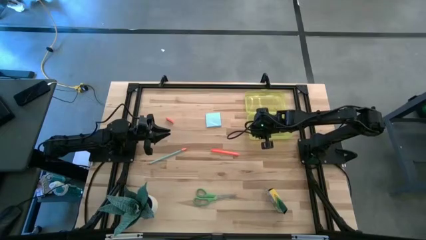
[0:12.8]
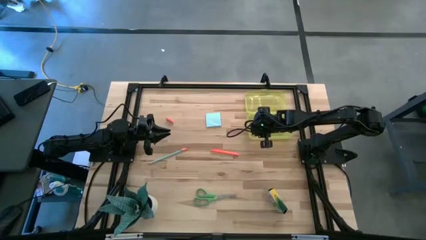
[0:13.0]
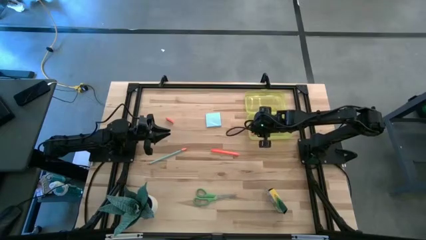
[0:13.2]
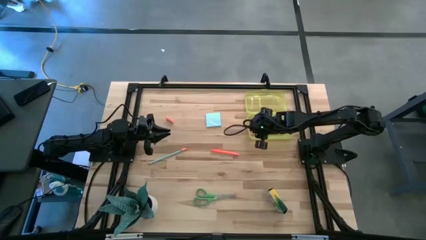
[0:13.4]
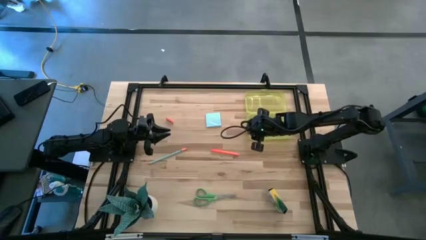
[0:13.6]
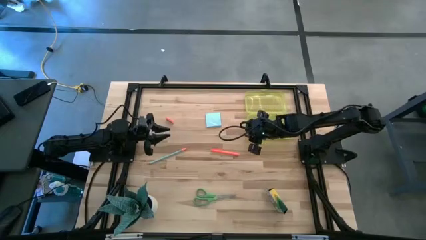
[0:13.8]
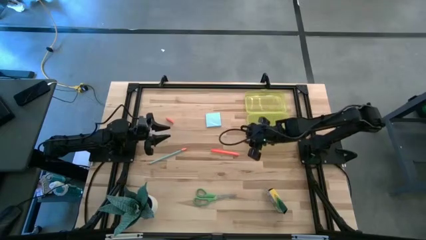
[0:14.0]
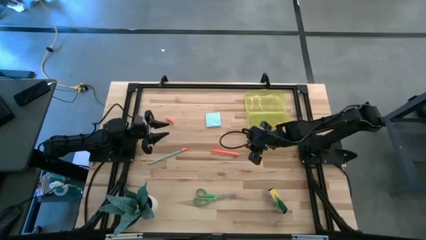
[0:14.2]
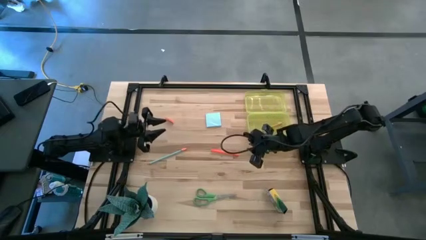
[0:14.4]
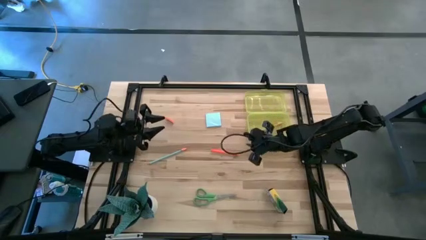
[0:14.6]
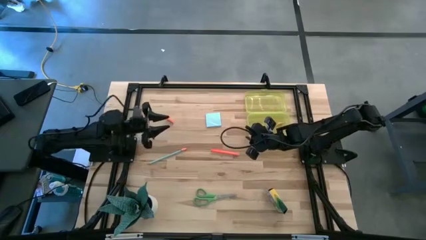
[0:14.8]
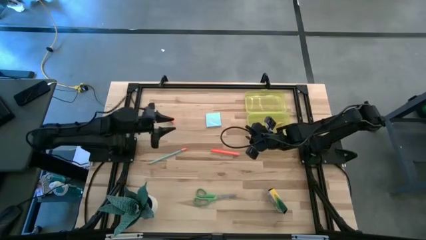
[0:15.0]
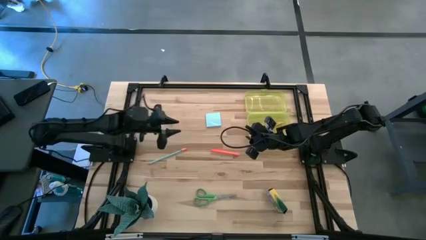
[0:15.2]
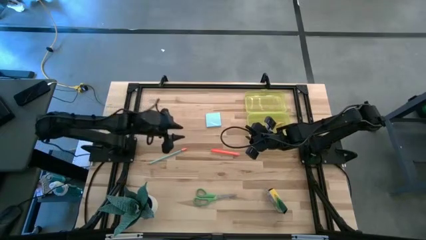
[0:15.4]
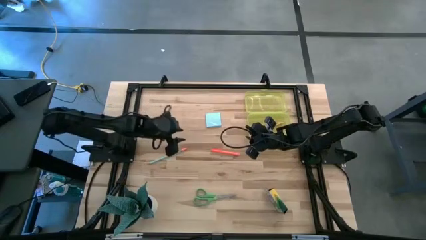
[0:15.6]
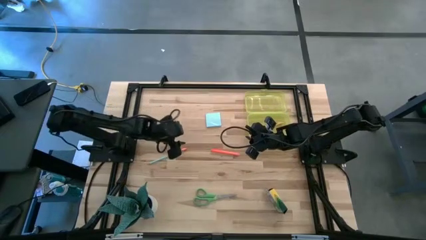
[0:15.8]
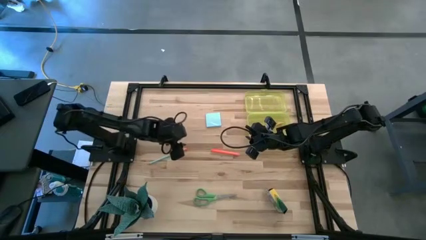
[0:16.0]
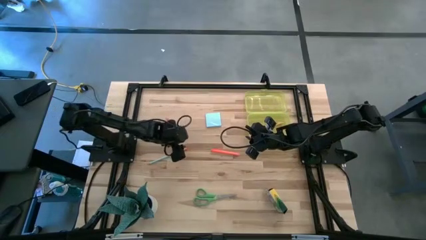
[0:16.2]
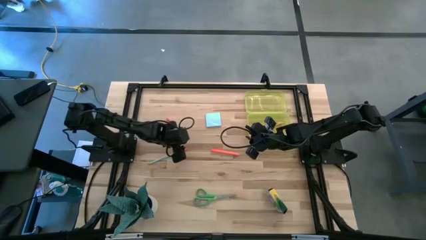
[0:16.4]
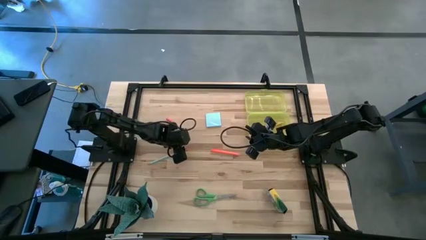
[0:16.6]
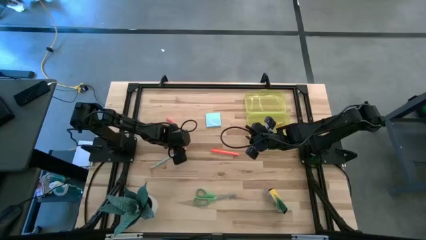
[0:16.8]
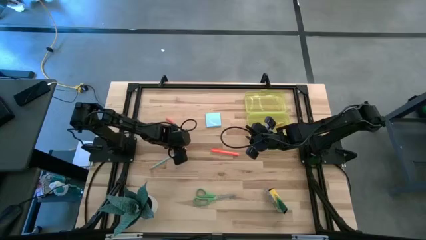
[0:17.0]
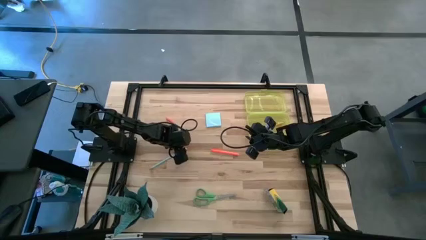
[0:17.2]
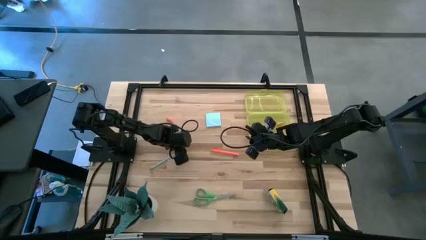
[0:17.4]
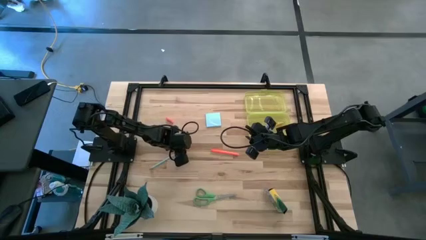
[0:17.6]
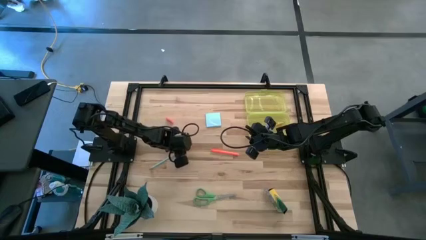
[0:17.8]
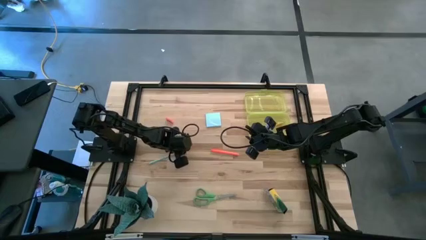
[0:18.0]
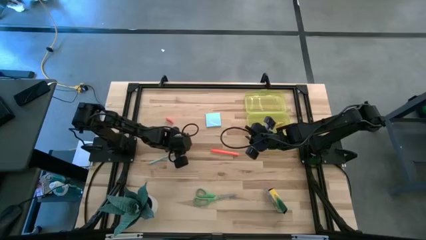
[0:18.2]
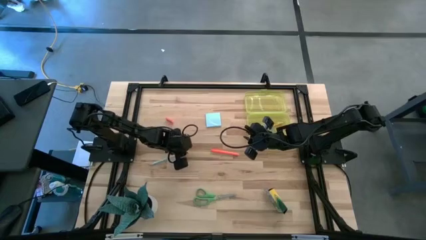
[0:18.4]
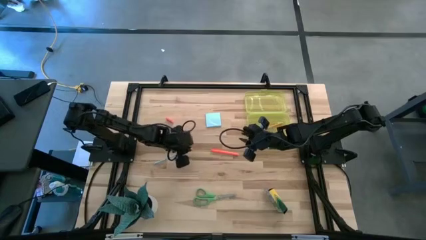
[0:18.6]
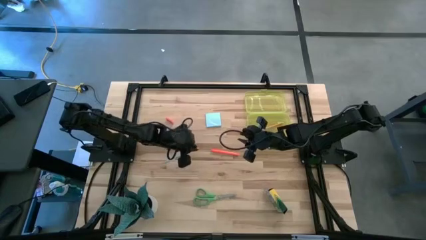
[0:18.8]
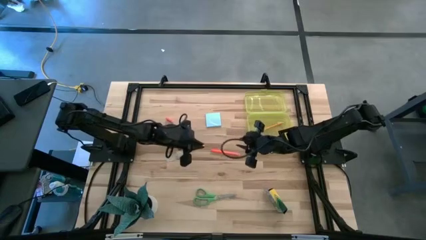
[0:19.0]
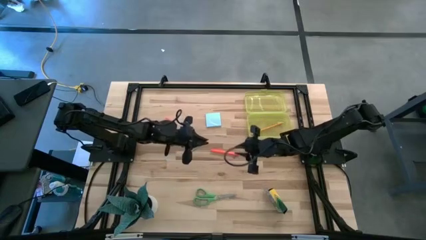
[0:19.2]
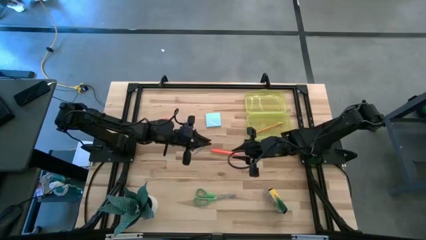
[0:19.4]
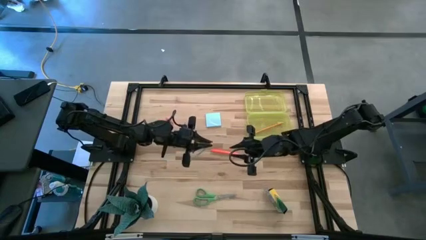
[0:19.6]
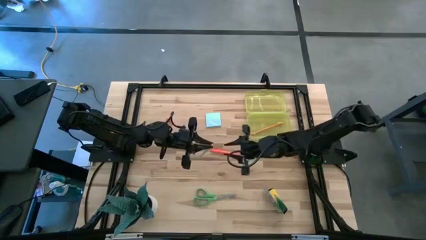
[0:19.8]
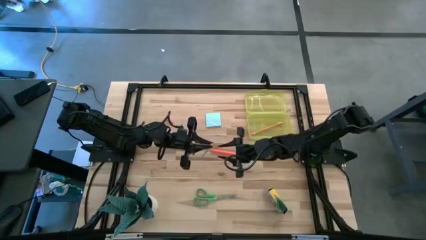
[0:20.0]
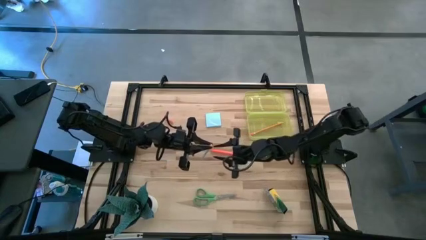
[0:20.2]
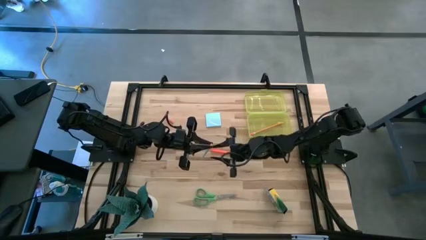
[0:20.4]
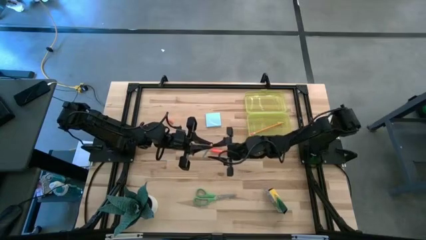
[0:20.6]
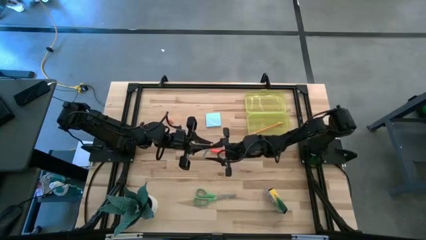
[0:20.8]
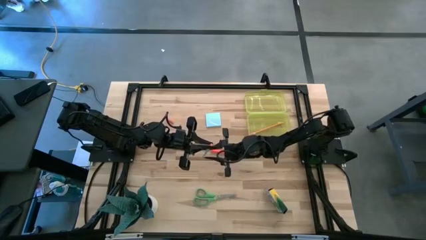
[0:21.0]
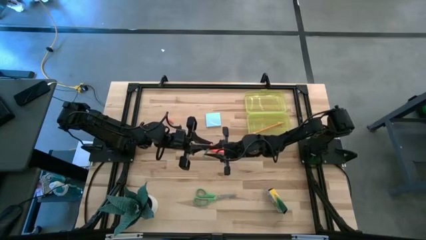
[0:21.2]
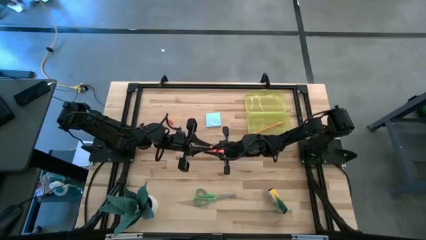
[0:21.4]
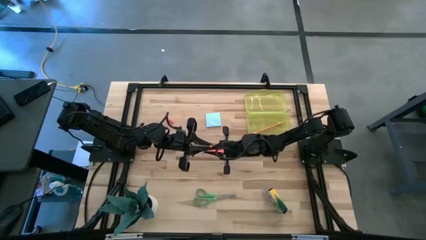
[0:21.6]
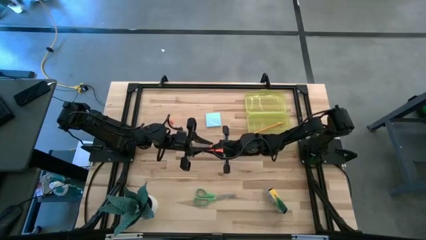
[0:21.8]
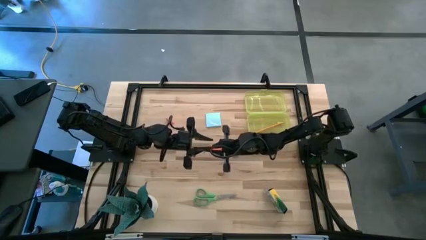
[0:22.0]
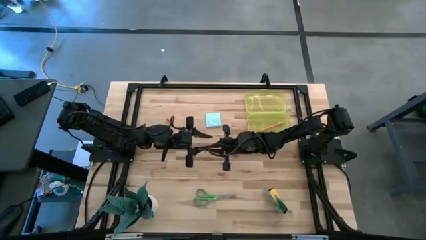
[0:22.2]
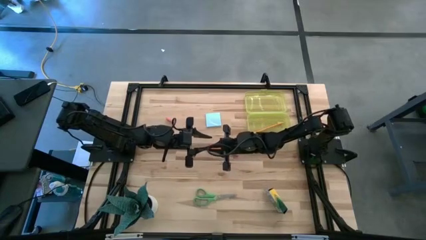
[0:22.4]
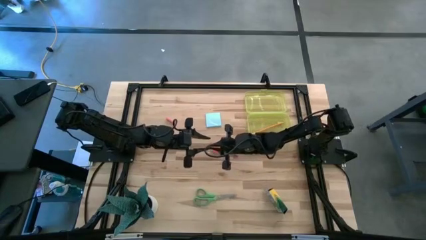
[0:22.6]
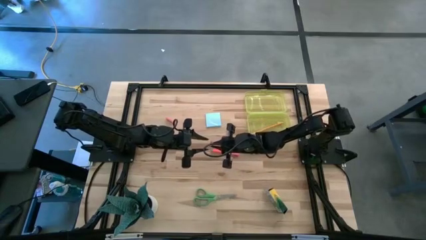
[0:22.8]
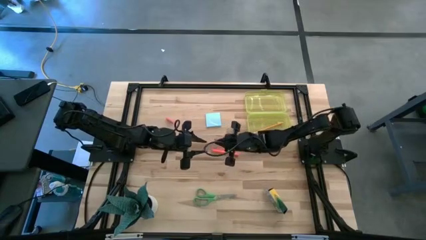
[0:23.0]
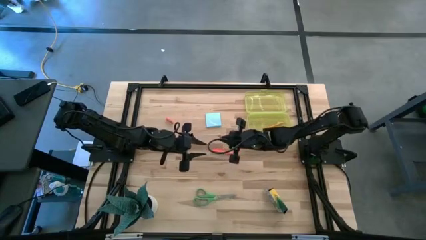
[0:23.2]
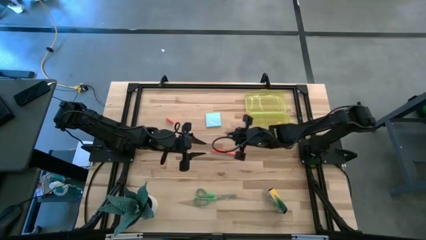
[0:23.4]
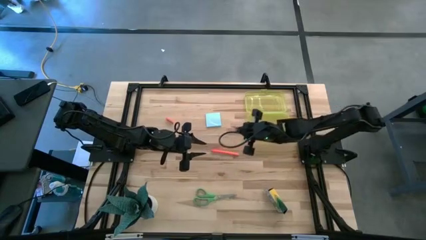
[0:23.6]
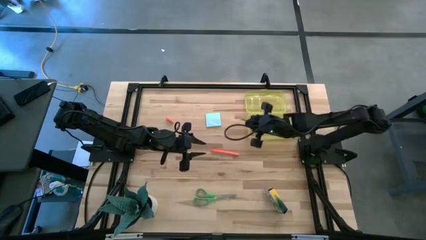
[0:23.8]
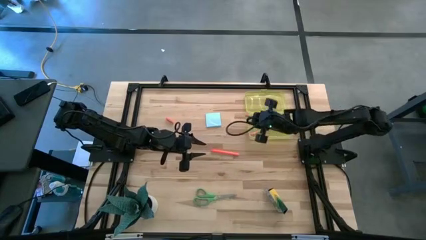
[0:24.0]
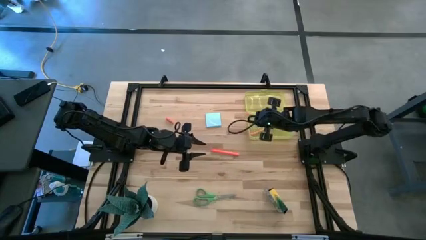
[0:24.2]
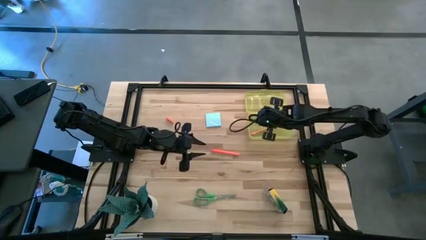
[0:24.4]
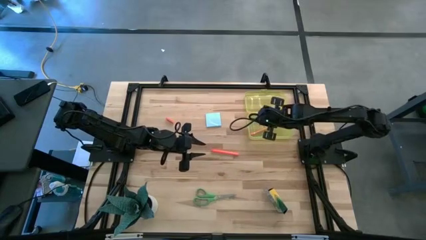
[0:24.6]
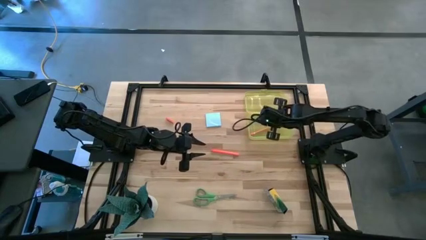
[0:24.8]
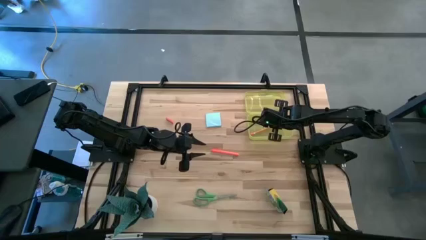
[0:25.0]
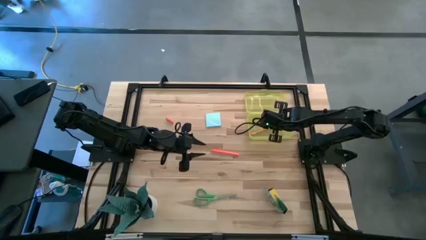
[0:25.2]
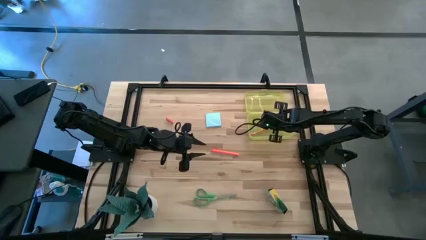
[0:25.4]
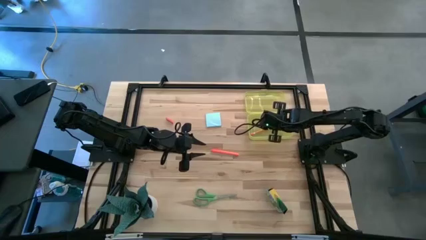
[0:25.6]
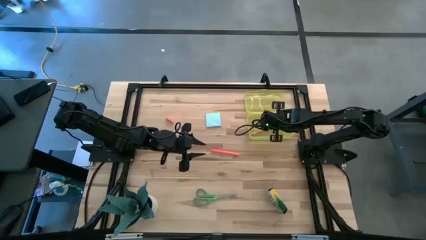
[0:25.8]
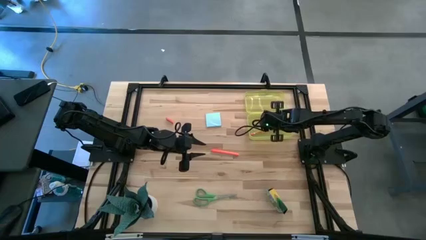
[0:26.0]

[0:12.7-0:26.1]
Task: Pack school essentials
Put the blue pencil into the yellow storage box

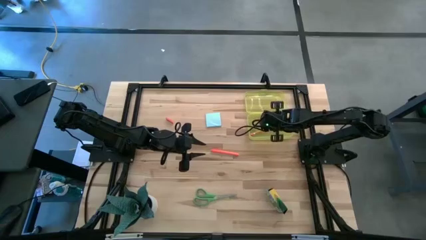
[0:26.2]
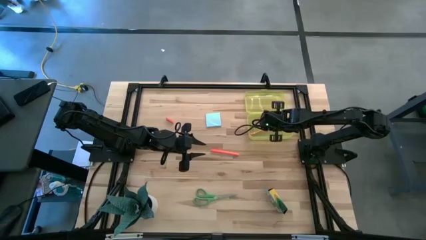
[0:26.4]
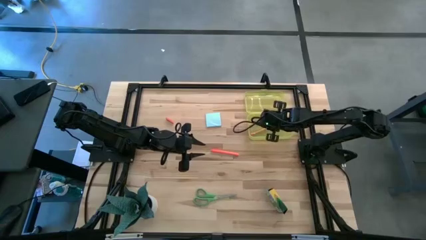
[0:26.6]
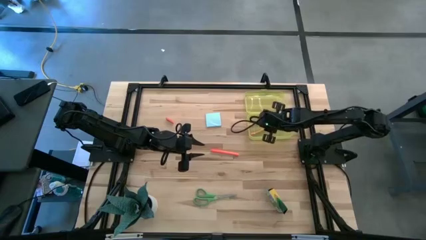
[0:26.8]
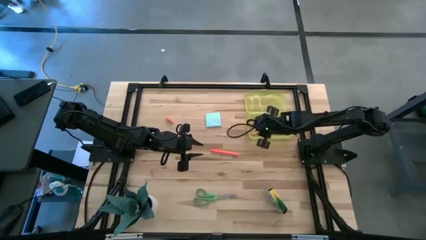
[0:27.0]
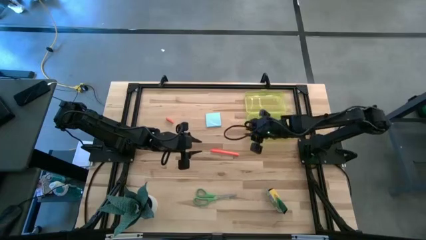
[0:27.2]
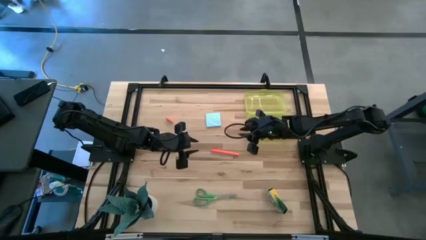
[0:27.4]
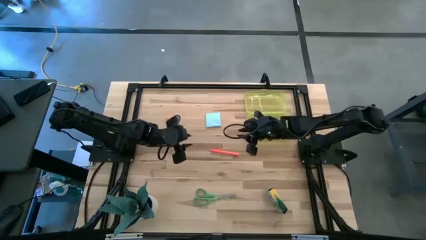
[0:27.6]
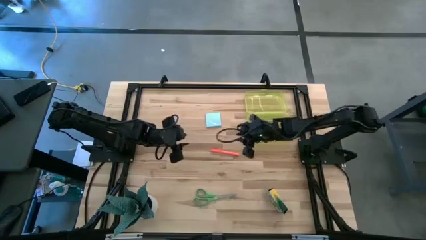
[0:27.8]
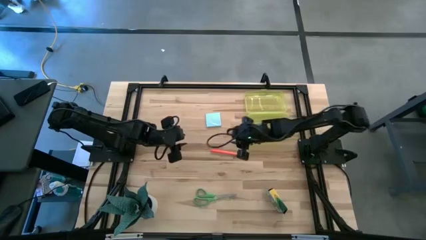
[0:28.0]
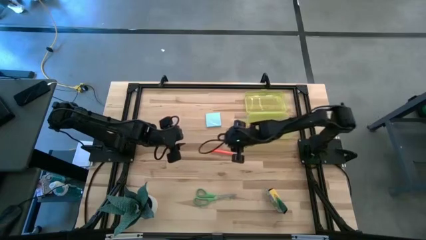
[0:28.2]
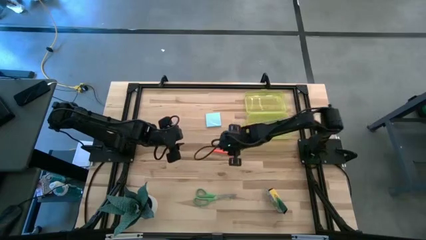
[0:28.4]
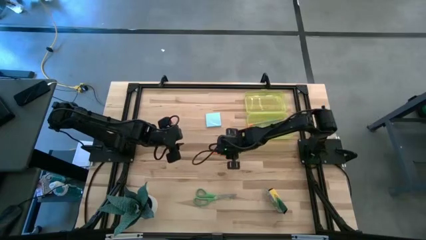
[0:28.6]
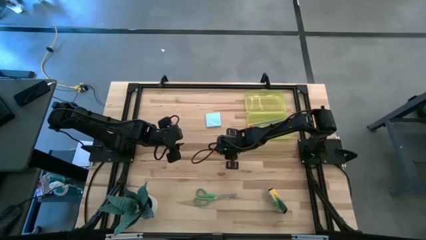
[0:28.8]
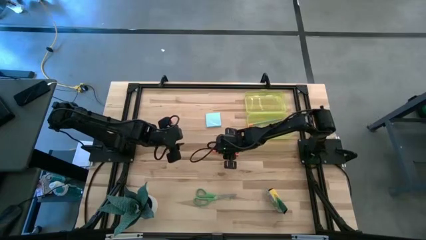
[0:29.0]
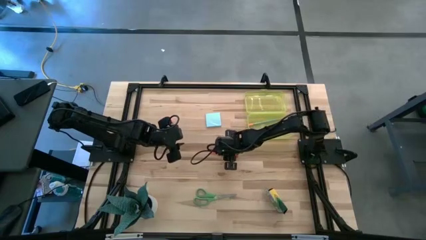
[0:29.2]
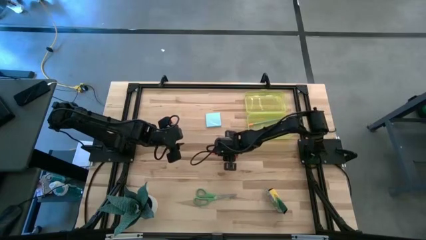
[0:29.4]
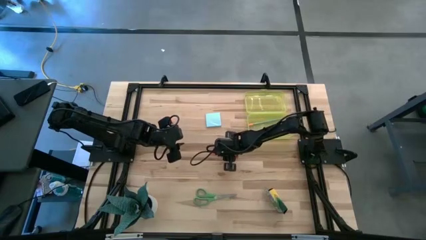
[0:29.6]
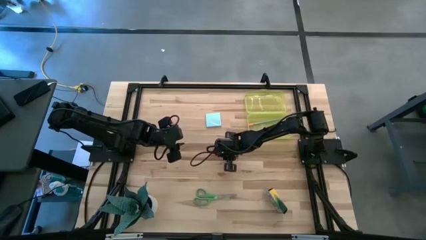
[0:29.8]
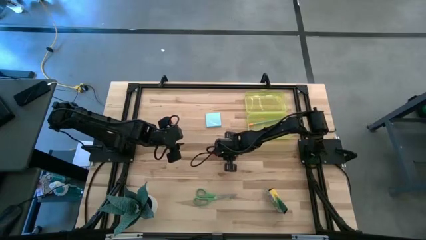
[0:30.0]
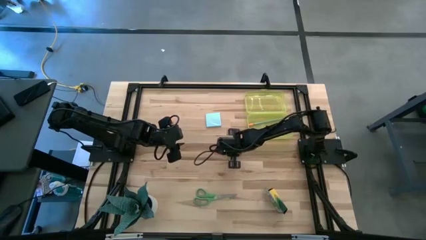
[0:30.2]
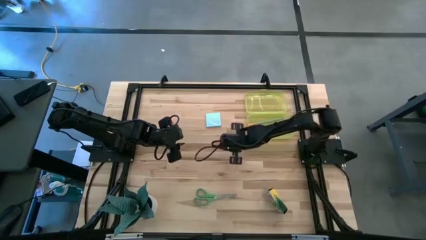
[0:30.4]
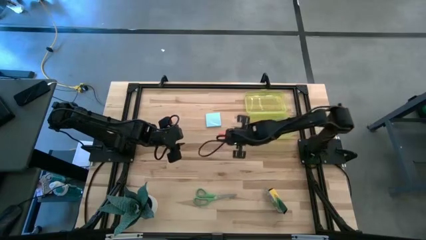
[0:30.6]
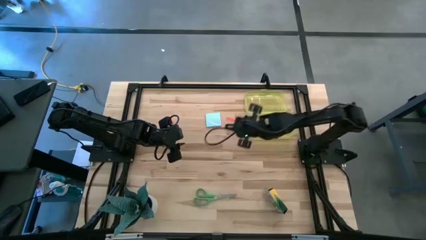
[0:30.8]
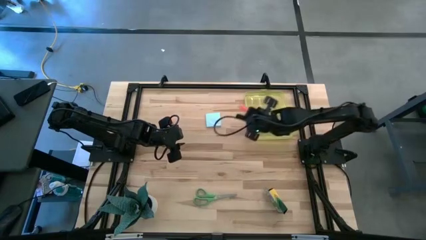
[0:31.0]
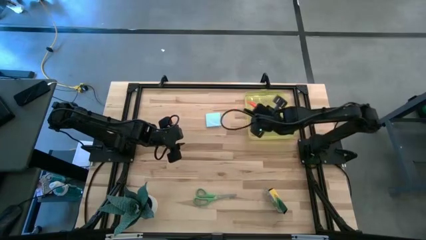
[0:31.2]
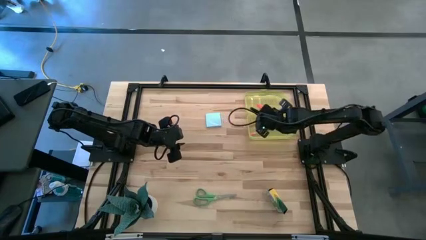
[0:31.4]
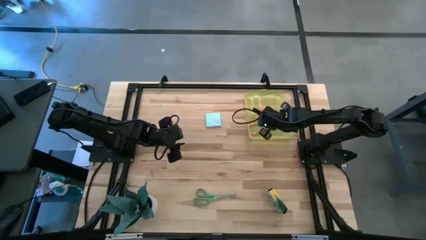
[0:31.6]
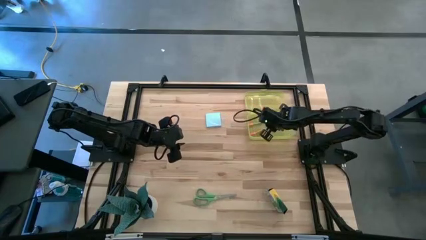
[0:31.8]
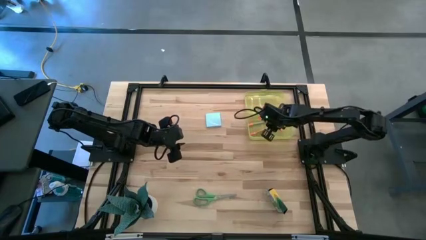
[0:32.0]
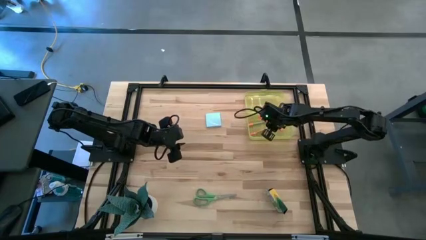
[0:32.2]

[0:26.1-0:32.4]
Put the orange pen into the yellow storage box
